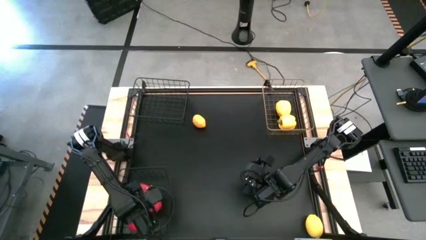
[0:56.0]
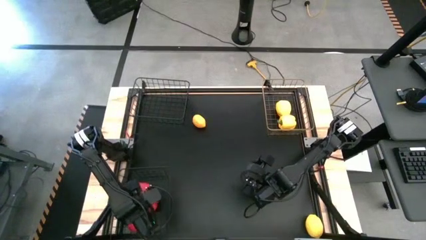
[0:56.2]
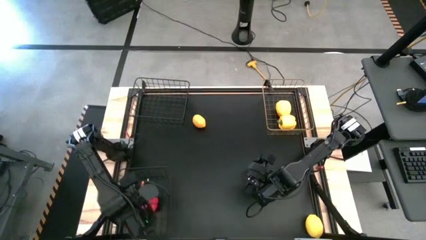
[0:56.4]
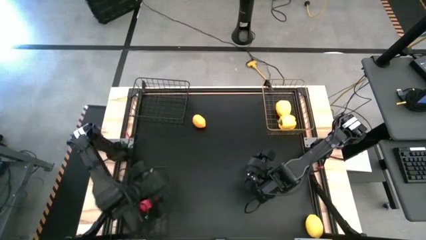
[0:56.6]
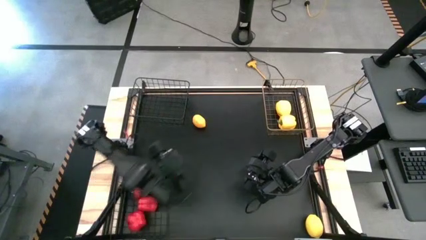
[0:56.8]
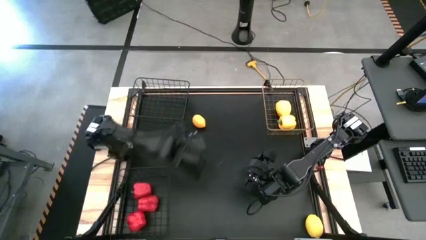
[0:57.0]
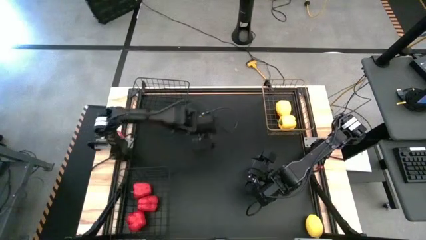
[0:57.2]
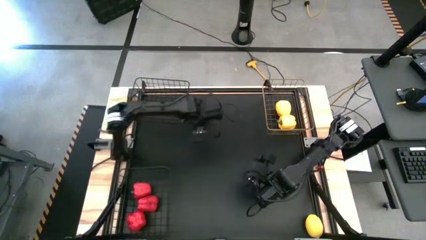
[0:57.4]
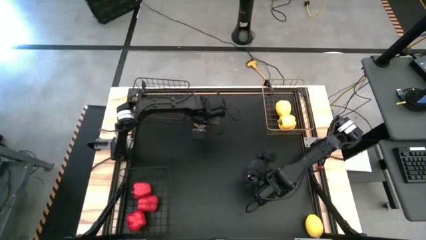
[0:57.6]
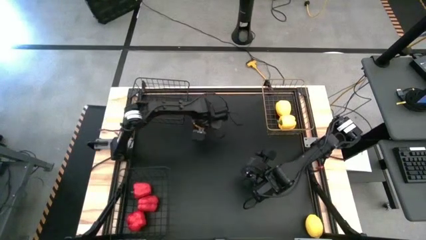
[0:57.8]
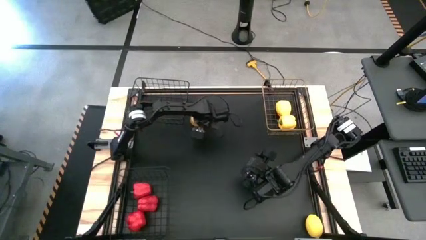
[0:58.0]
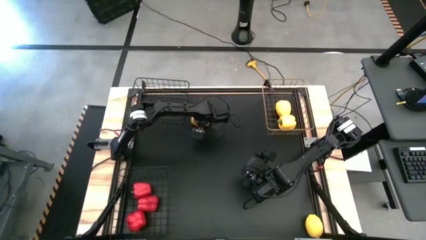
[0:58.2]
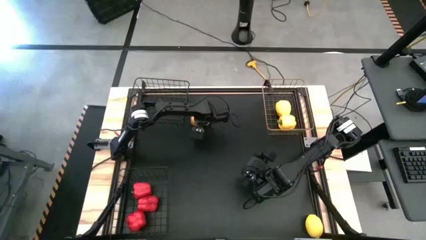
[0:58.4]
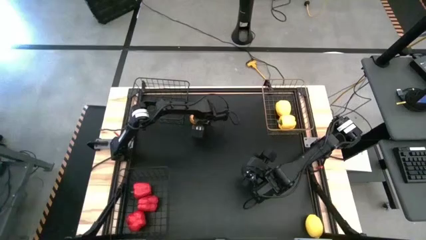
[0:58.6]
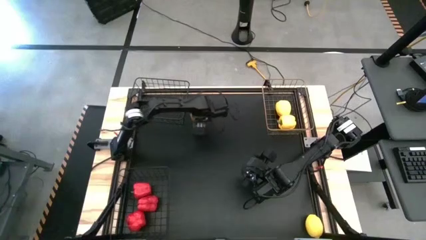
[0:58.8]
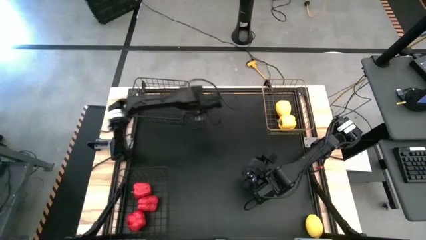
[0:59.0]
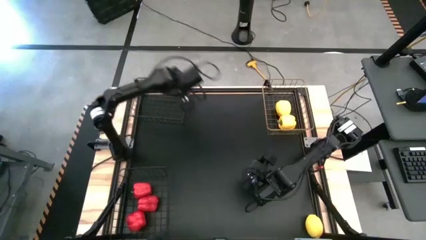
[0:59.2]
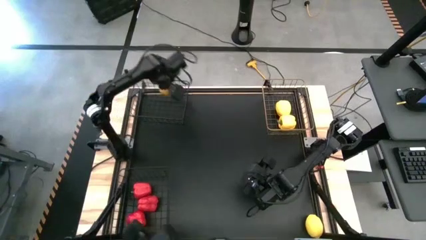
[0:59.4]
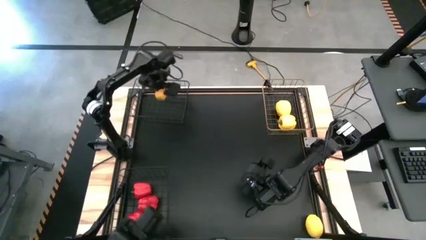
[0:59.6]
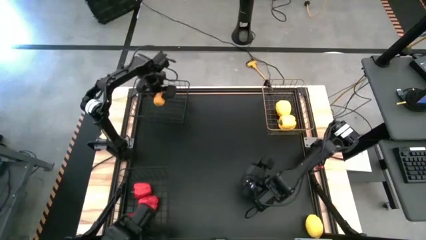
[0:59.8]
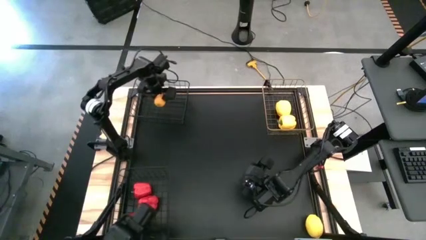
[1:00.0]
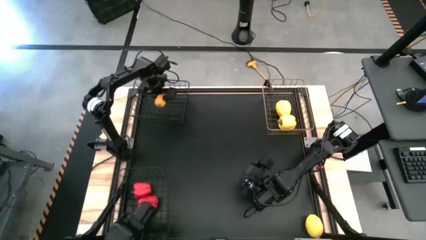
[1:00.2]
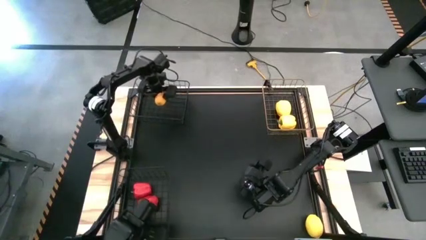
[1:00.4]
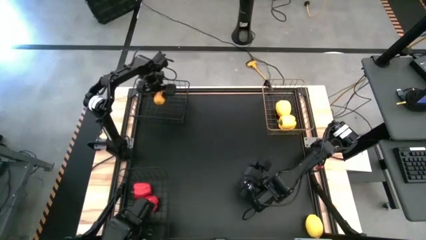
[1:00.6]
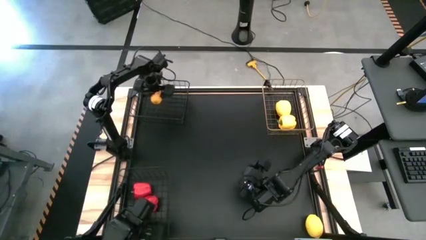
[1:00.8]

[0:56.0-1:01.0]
Task: Sort produce into baskets
Put the top yellow lemon into the top black wire basket

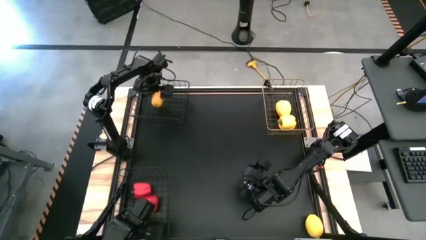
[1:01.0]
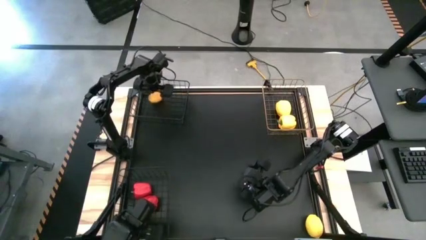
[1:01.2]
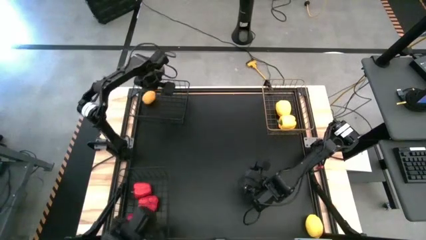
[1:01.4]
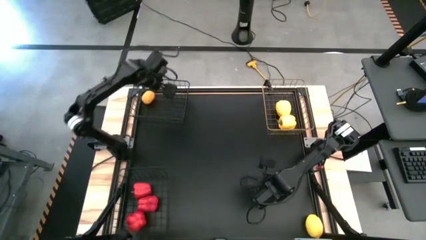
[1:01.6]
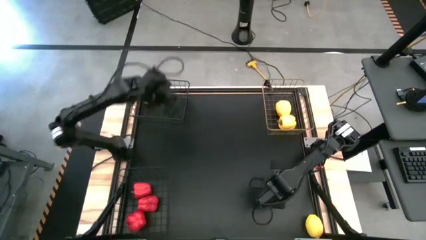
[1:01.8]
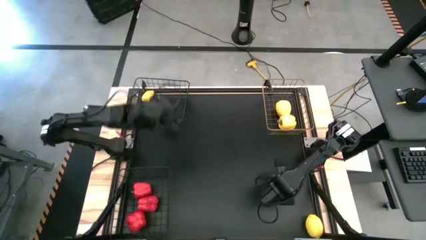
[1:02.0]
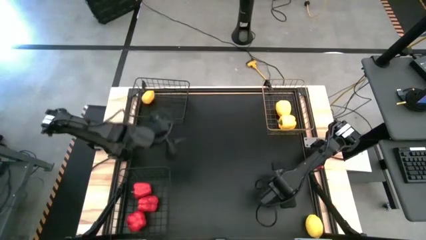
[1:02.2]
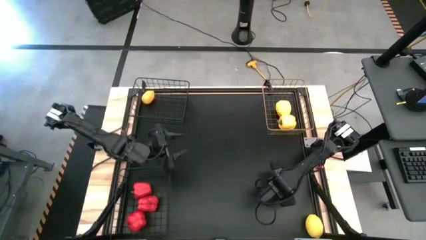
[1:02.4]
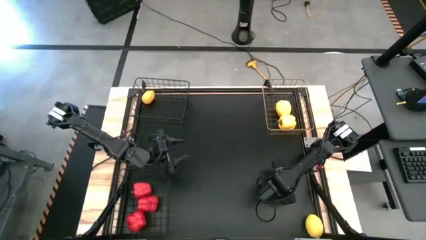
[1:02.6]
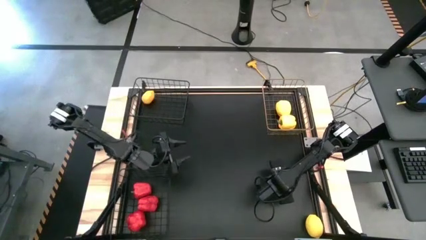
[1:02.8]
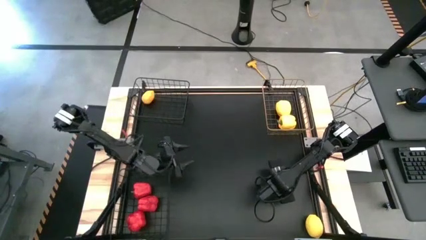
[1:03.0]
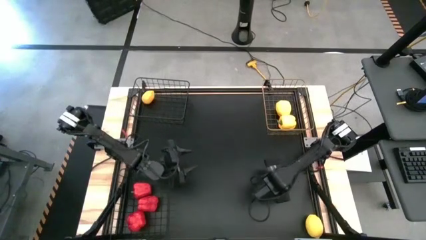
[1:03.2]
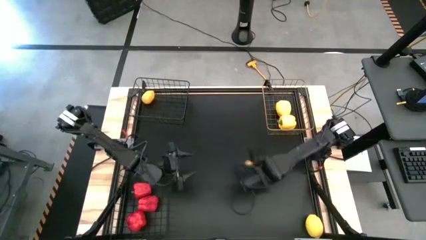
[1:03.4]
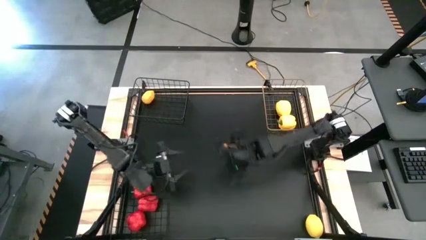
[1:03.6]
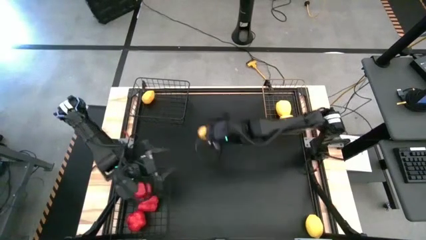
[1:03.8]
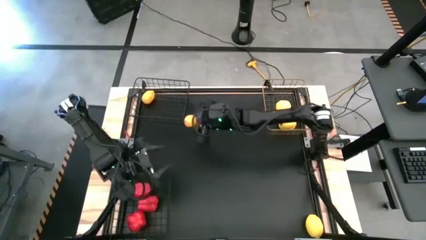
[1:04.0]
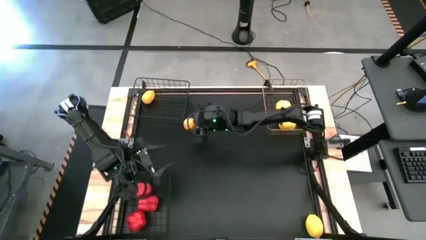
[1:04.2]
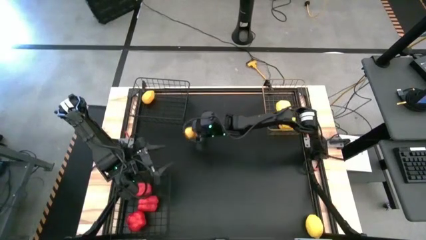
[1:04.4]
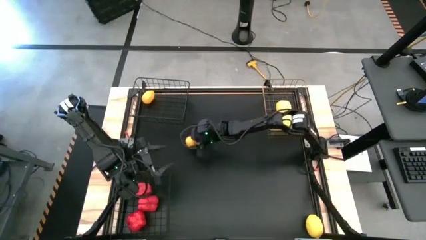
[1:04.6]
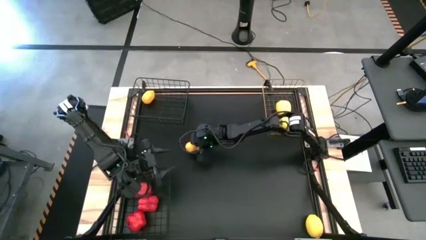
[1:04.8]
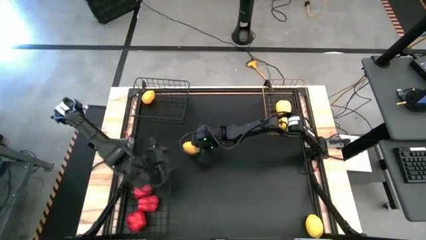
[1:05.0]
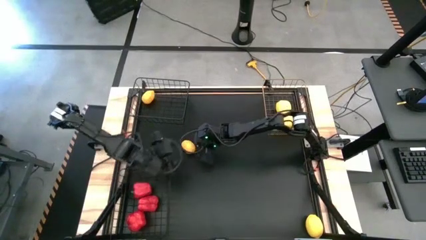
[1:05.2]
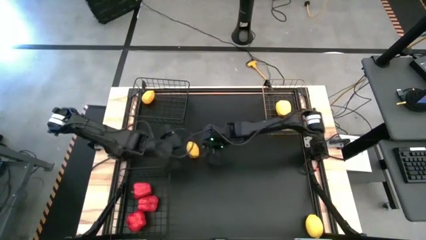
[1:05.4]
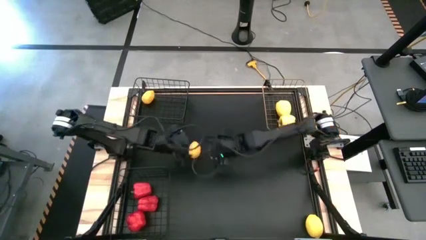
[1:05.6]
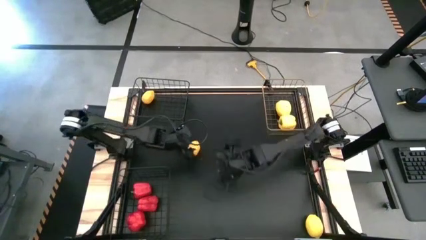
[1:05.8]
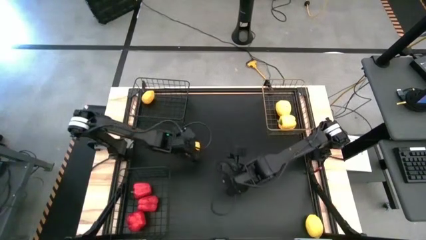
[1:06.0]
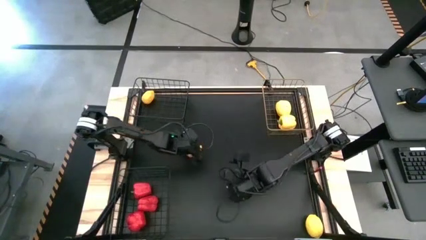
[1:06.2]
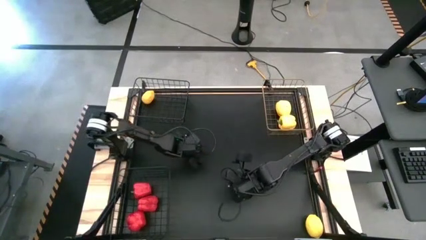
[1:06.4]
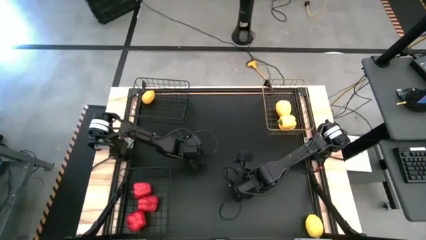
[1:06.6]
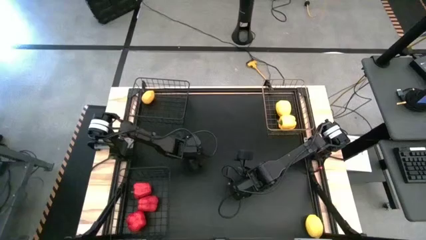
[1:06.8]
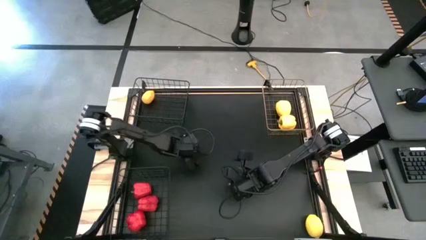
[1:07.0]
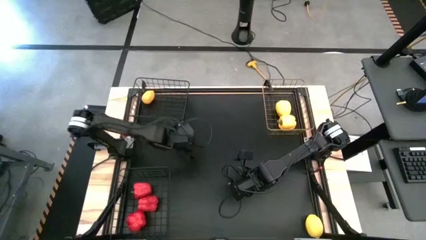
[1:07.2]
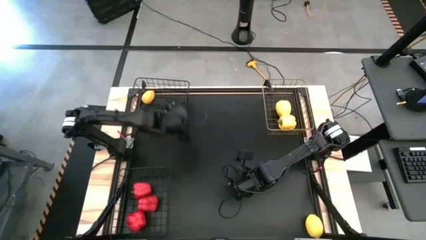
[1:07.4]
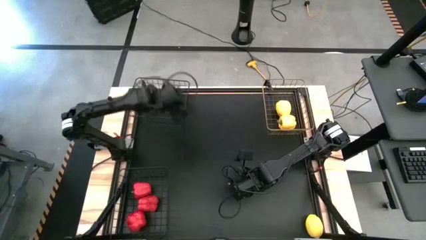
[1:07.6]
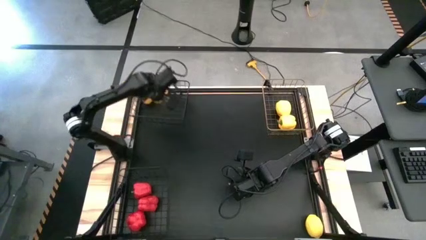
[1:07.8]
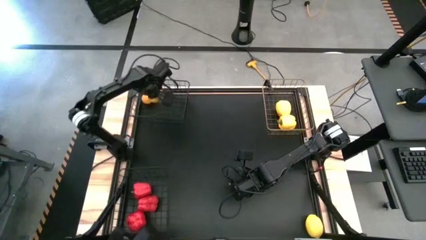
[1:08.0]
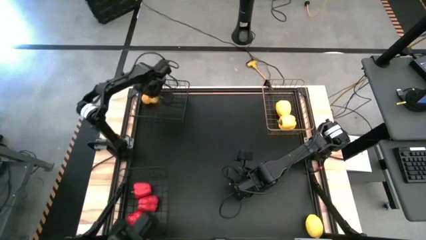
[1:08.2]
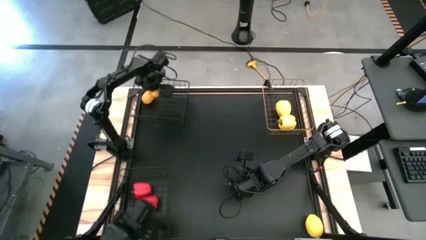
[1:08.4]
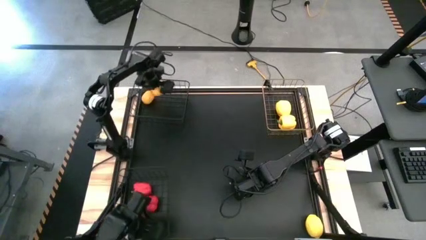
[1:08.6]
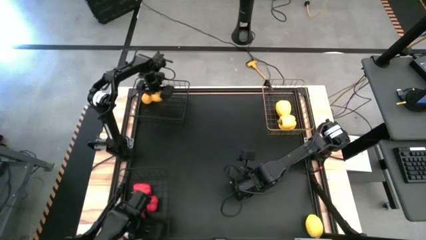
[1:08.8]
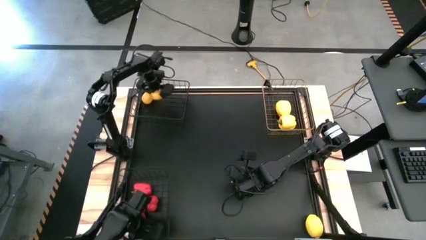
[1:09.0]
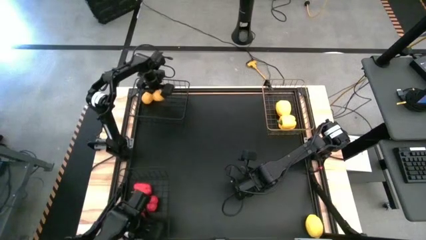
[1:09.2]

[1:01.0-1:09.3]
Put the top yellow lemon to the top black wire basket

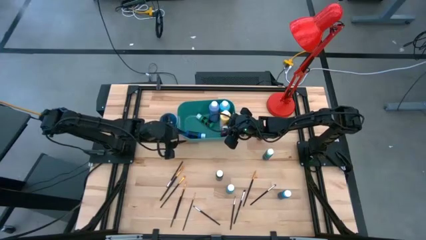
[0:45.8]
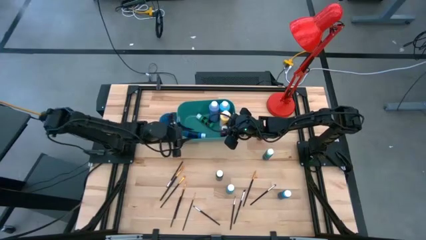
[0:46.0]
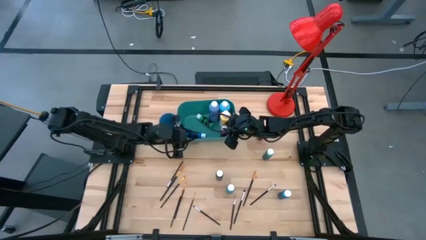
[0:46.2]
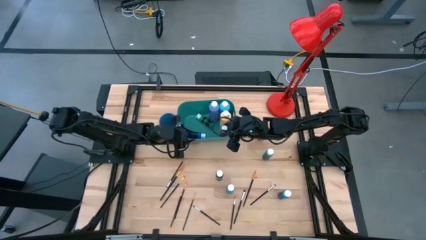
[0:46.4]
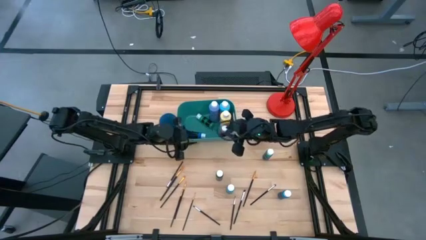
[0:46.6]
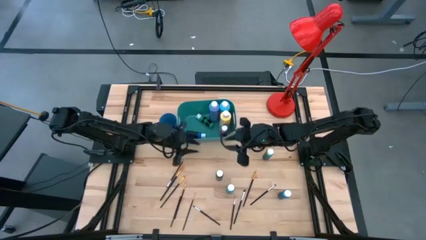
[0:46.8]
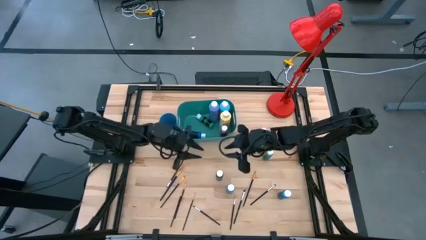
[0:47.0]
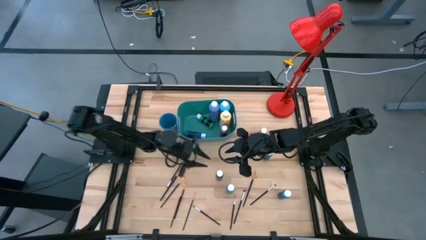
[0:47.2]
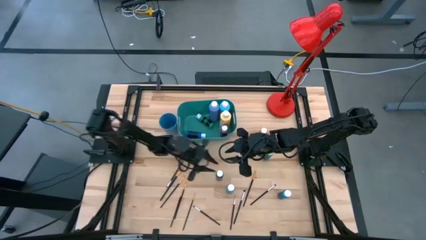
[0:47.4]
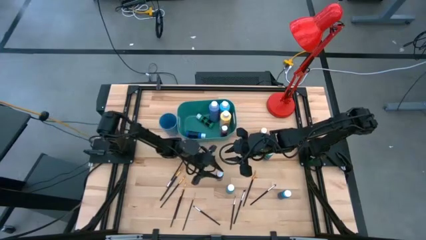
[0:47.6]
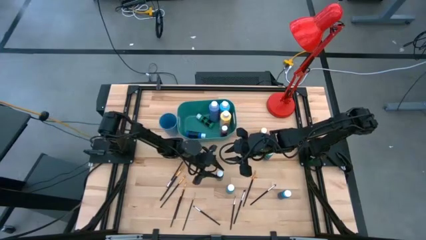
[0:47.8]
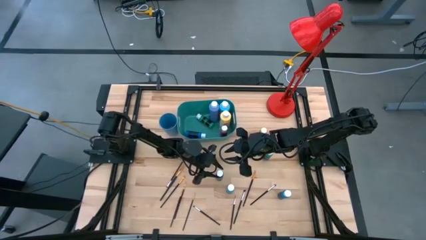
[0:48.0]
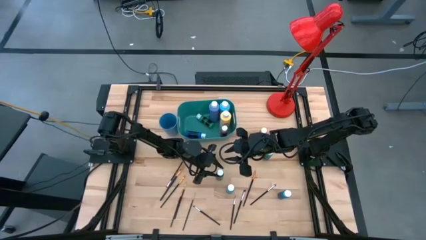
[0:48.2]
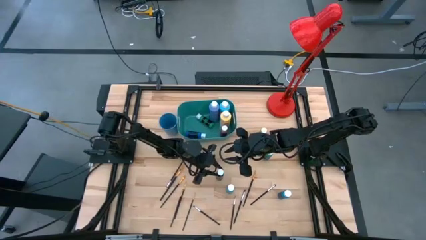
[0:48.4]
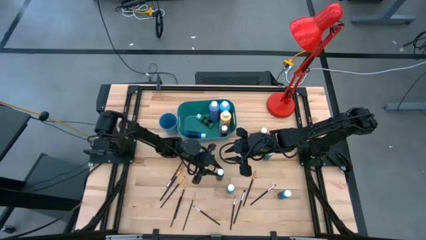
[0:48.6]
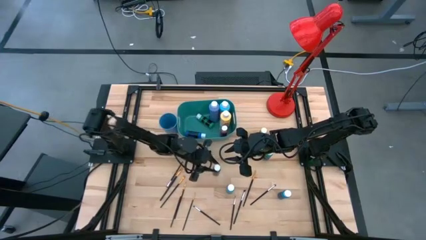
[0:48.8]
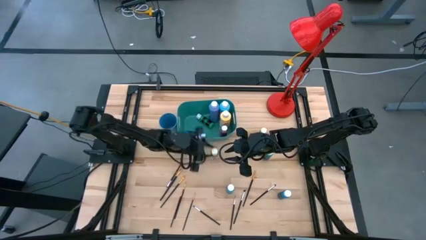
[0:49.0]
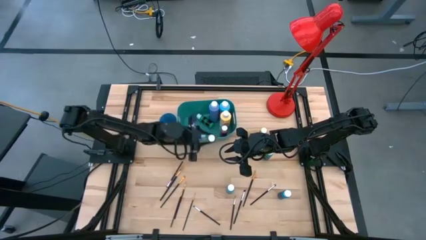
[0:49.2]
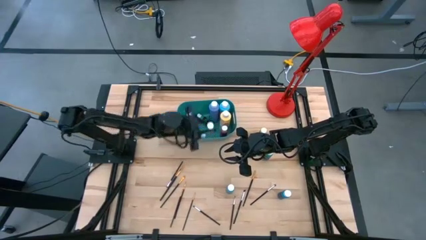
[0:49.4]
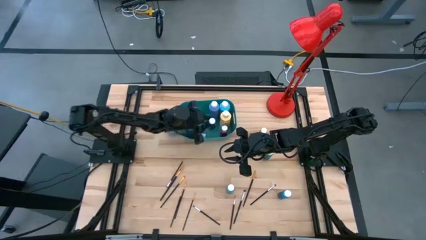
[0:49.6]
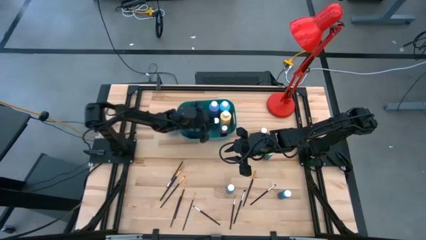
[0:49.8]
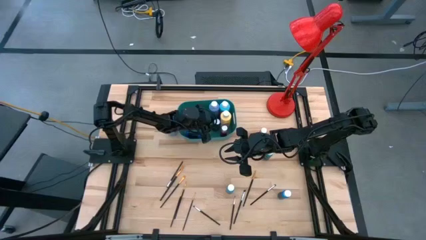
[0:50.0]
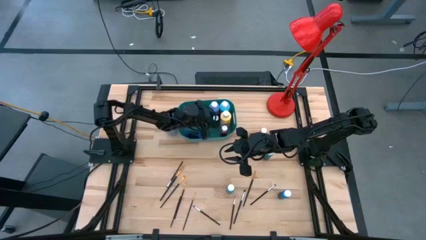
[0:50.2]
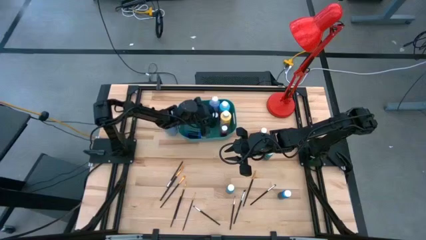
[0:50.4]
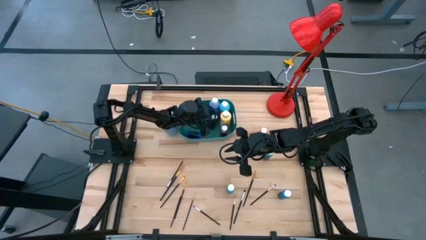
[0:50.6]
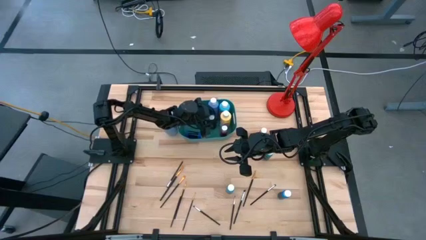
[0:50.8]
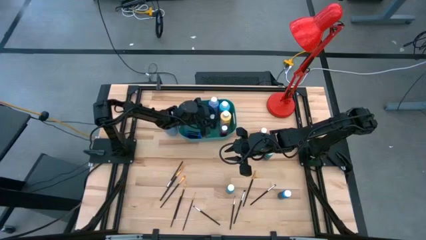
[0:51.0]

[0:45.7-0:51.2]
Task: Pick & Place Paint Supplies
Put the small black paint bottle into the green bin
